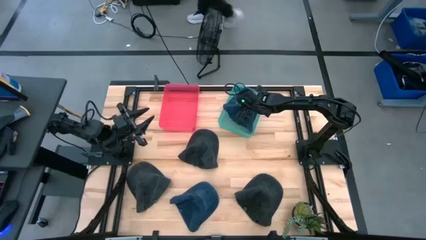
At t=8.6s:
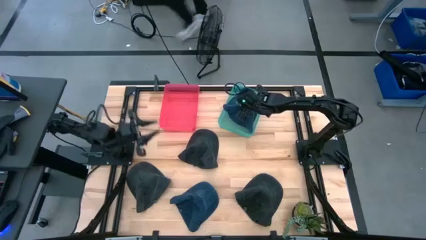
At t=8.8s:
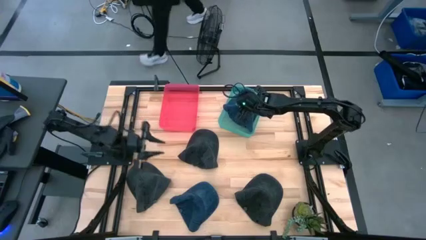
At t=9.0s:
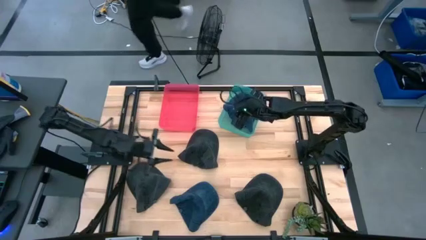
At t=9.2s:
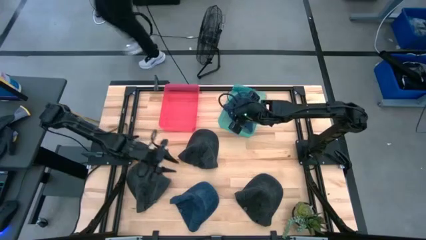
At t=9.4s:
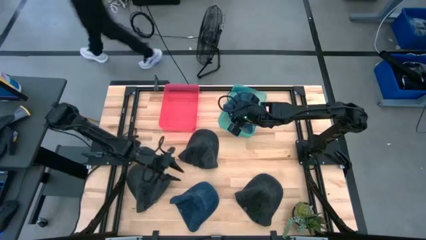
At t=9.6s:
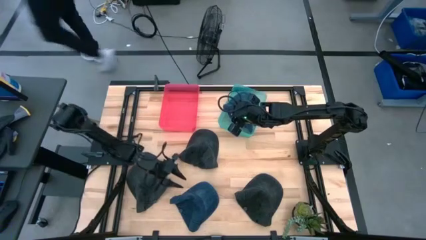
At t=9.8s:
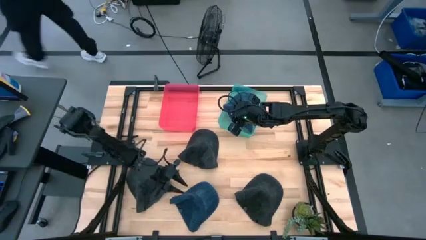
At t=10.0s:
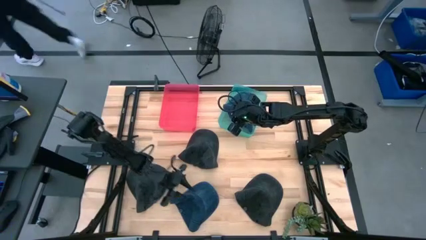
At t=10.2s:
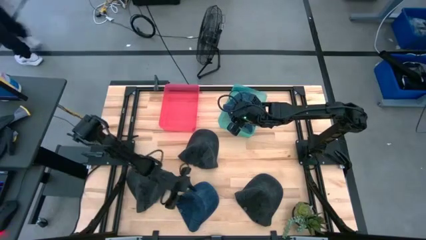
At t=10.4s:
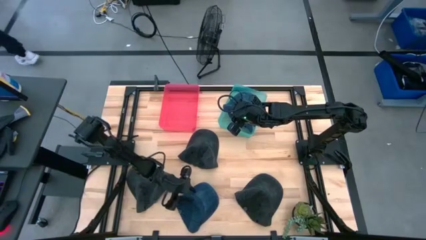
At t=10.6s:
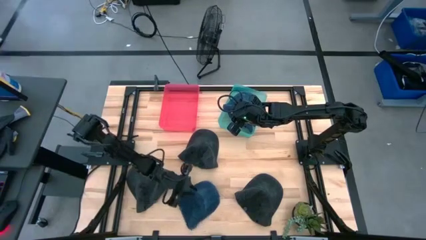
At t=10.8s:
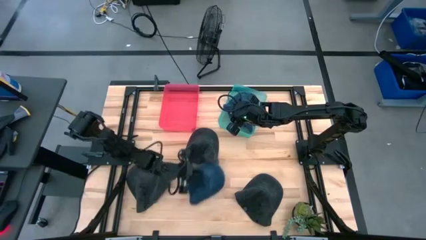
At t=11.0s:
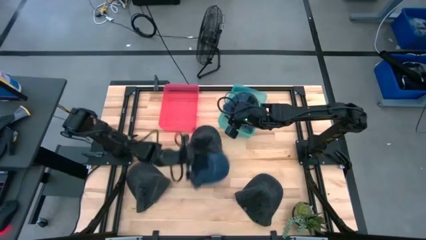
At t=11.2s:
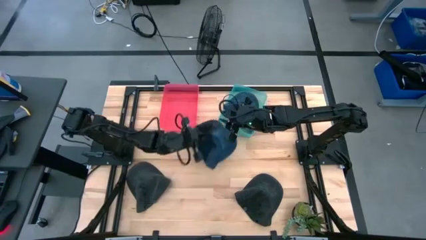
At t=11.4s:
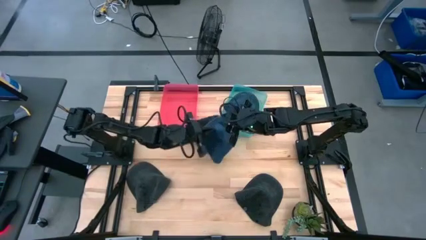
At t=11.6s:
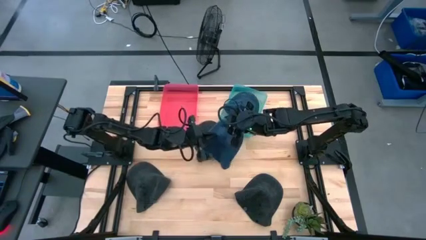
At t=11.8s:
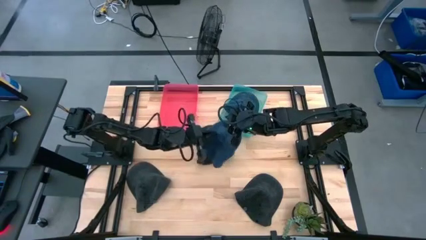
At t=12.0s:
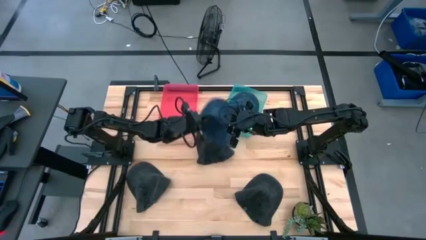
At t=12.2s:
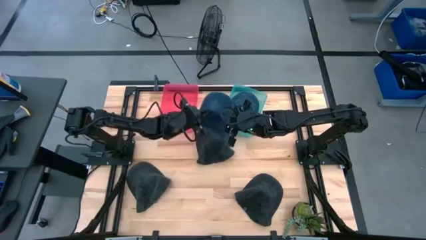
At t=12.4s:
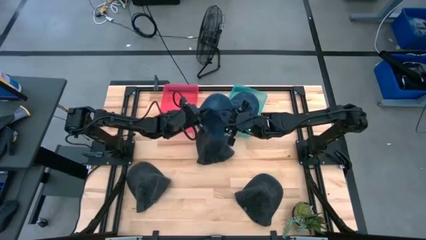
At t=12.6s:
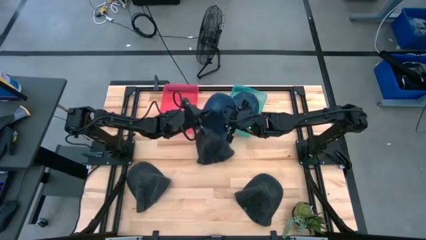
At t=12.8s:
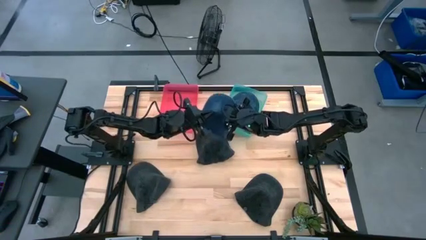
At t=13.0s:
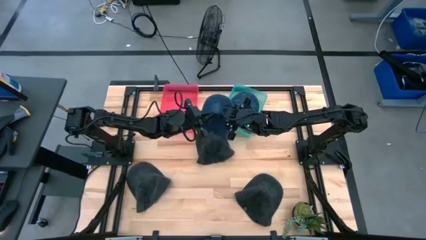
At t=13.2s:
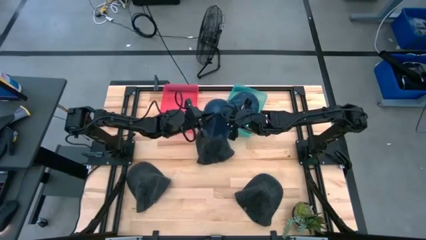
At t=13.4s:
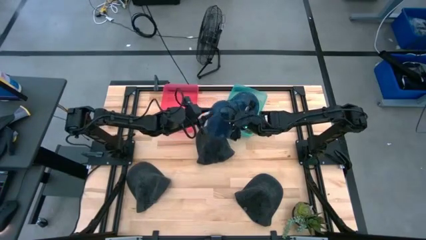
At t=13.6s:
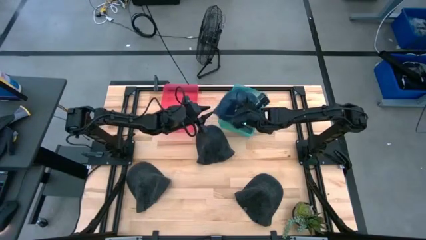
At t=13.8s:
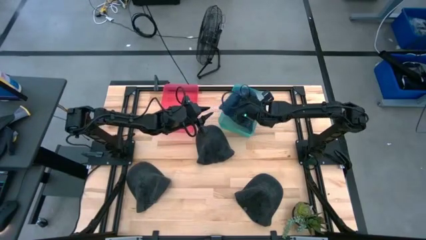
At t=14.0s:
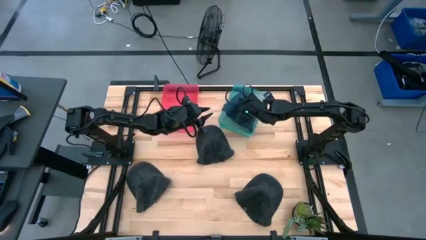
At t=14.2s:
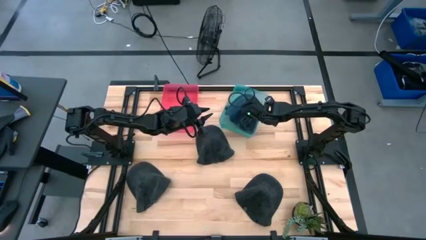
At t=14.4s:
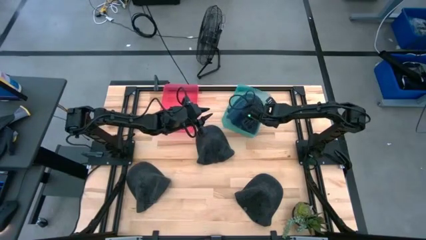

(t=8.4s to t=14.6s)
Task: Pick & Place hat
Put the blue cap into the blue bin

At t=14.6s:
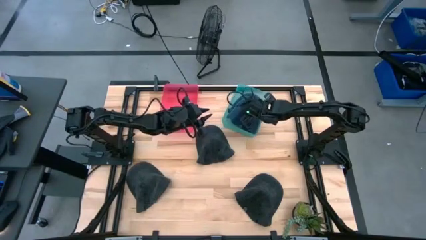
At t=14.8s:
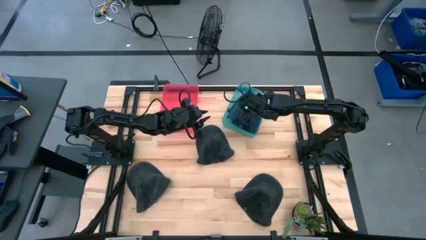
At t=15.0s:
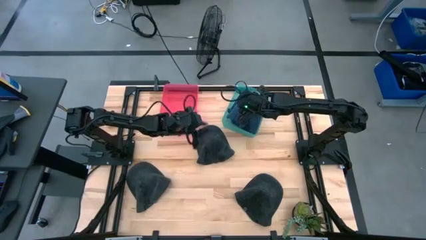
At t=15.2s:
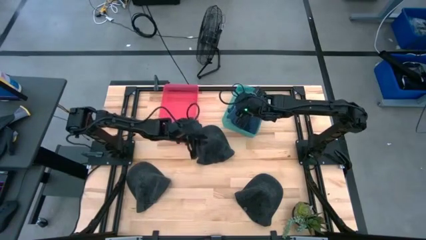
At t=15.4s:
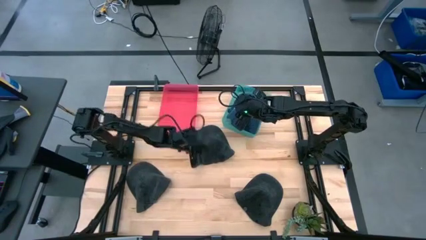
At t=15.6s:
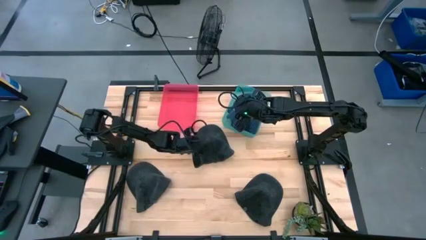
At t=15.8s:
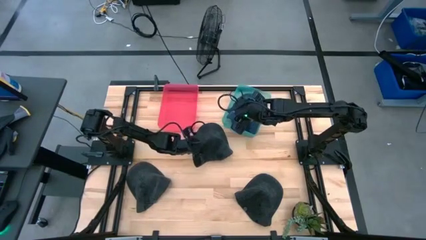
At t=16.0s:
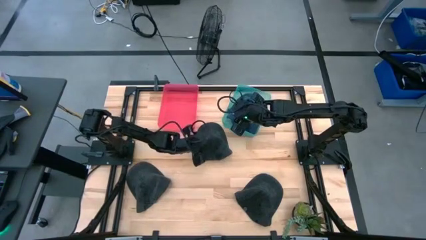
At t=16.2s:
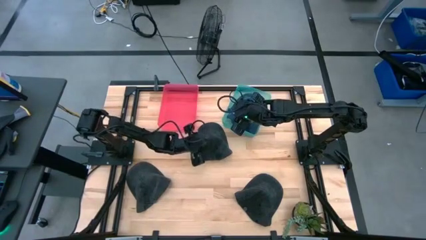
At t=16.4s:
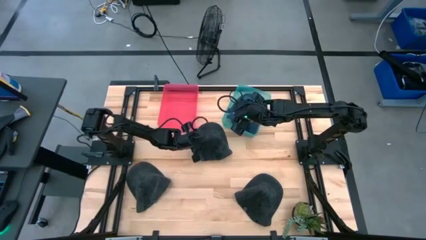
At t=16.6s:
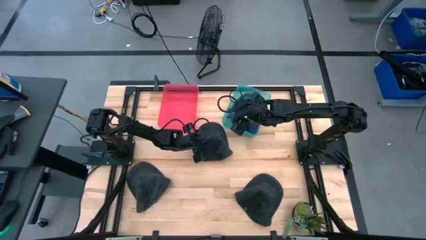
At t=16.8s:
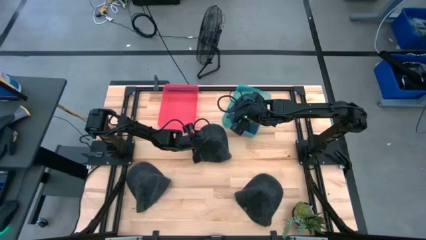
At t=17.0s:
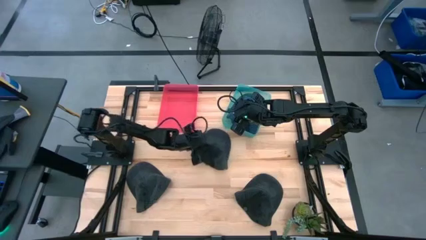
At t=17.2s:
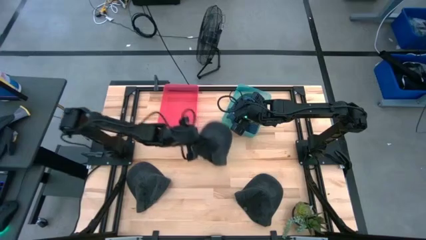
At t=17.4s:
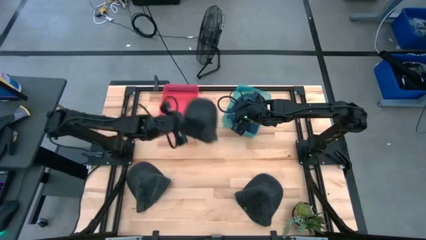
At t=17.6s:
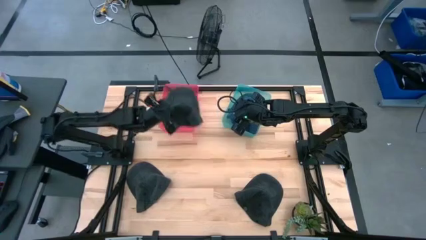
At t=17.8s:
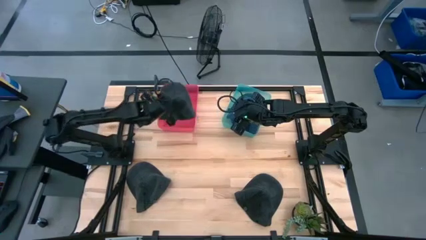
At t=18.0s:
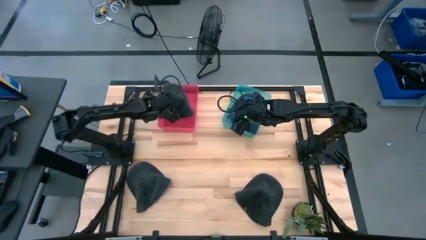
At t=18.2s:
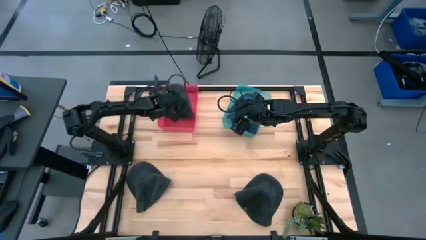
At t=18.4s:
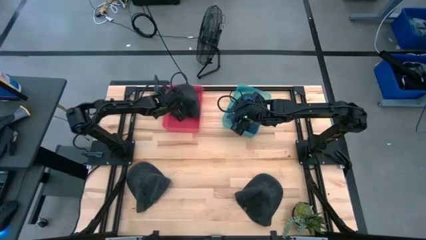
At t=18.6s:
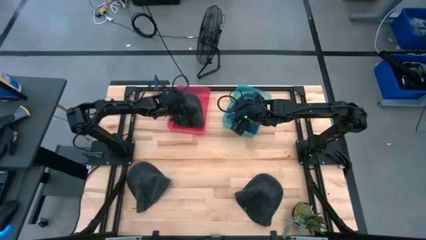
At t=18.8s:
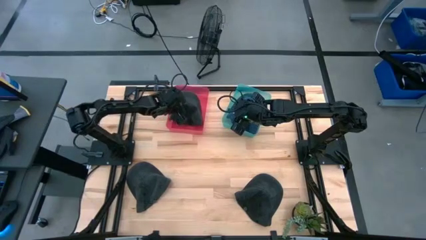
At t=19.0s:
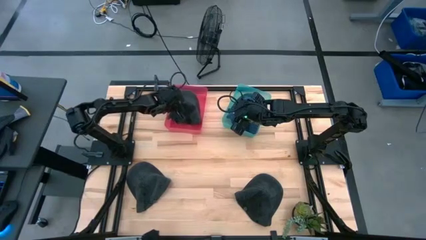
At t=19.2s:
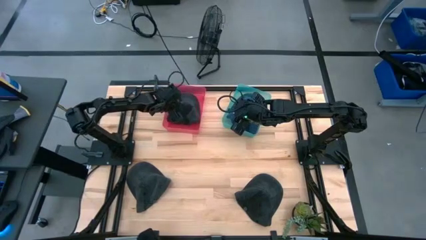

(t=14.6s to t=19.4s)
Put the top black cap into the red bin

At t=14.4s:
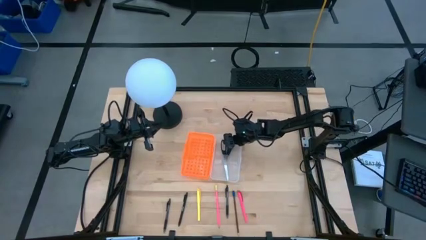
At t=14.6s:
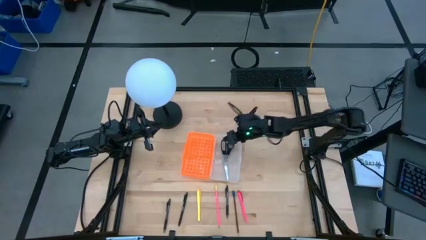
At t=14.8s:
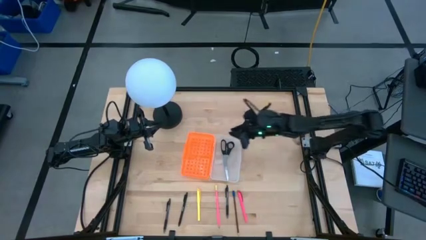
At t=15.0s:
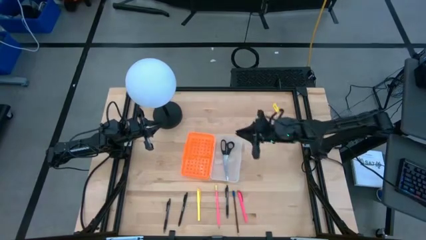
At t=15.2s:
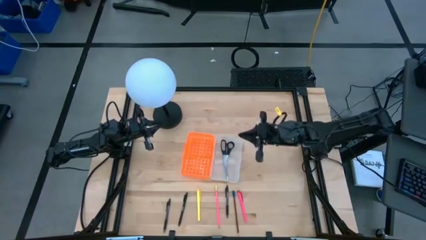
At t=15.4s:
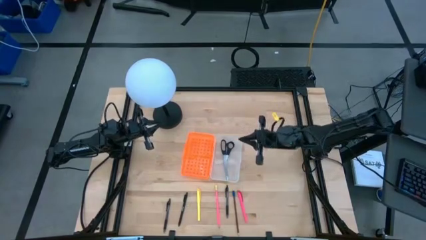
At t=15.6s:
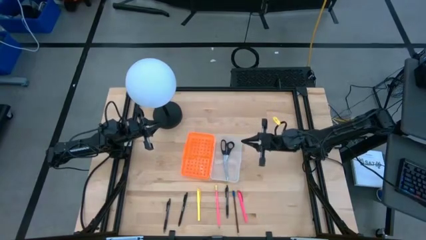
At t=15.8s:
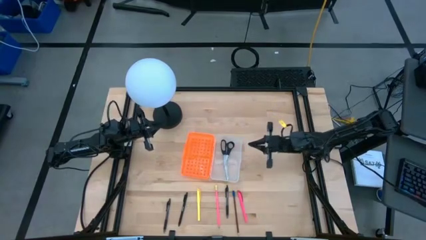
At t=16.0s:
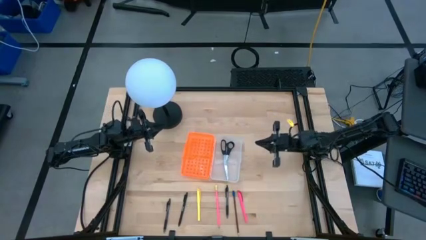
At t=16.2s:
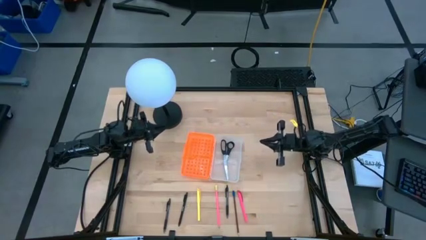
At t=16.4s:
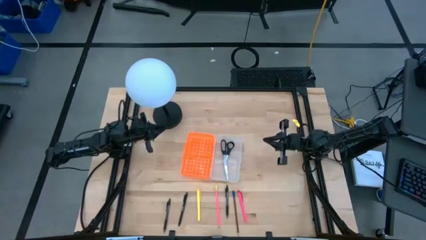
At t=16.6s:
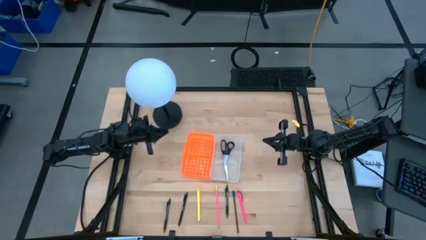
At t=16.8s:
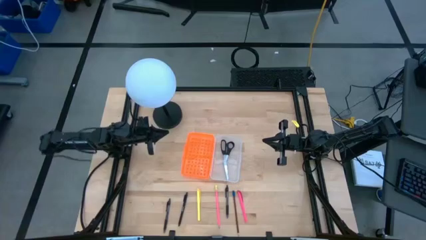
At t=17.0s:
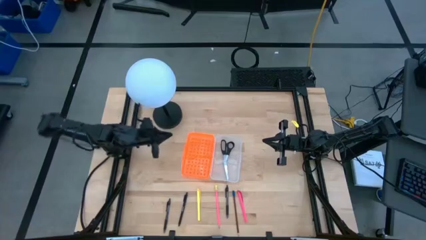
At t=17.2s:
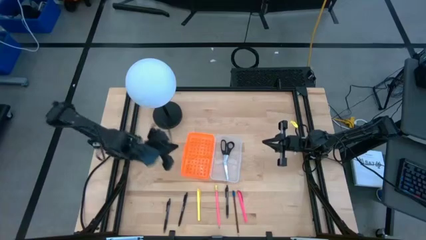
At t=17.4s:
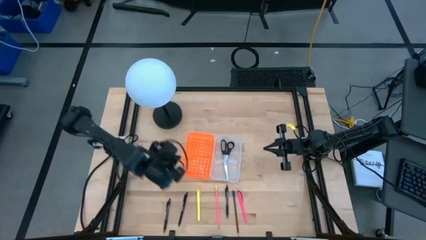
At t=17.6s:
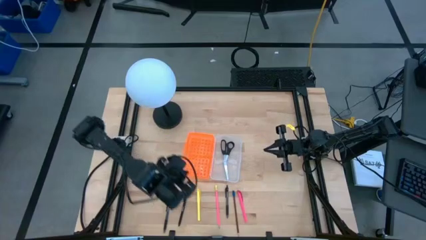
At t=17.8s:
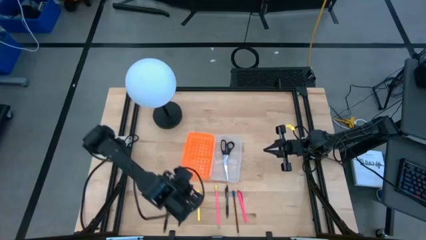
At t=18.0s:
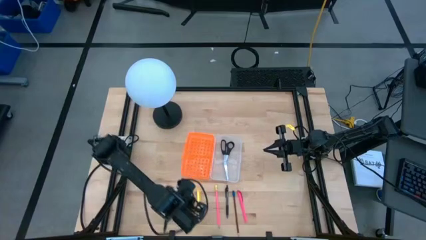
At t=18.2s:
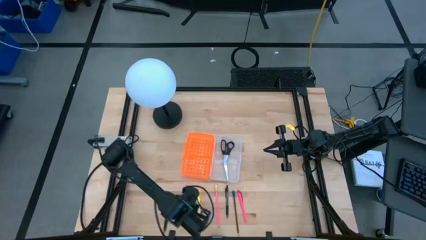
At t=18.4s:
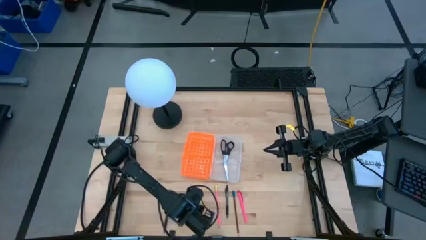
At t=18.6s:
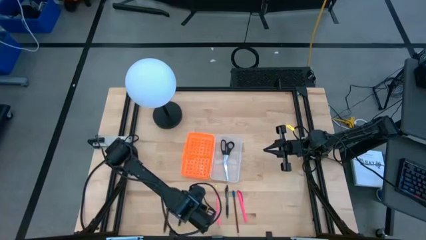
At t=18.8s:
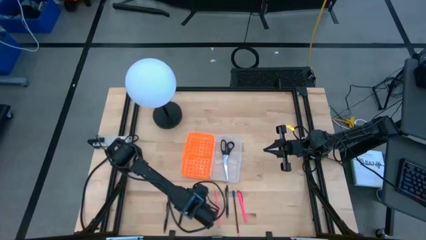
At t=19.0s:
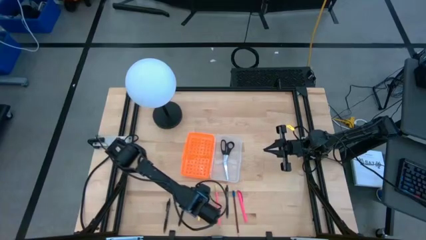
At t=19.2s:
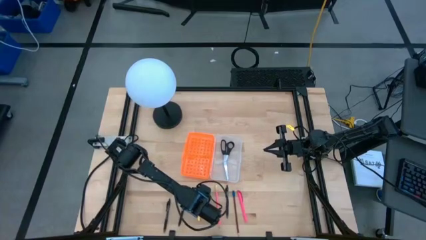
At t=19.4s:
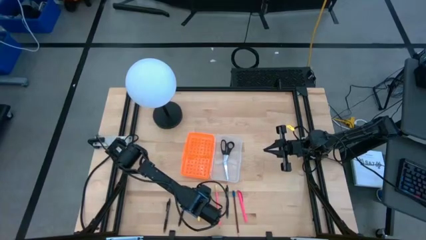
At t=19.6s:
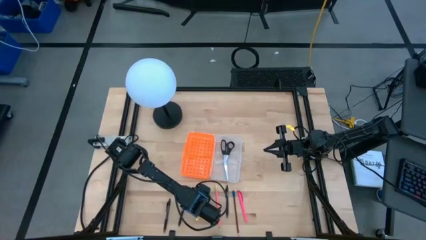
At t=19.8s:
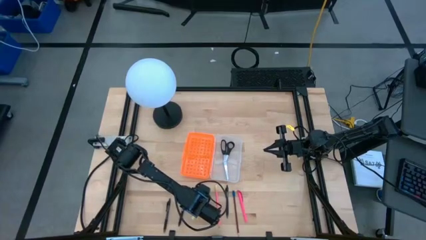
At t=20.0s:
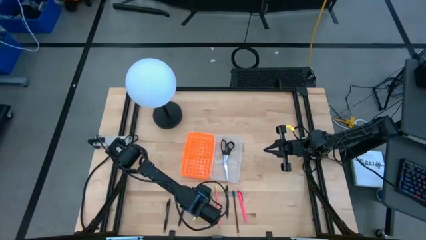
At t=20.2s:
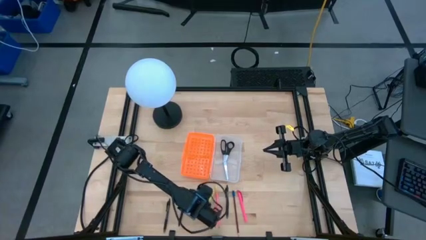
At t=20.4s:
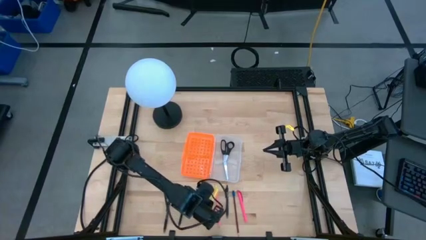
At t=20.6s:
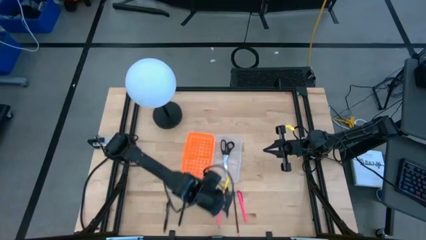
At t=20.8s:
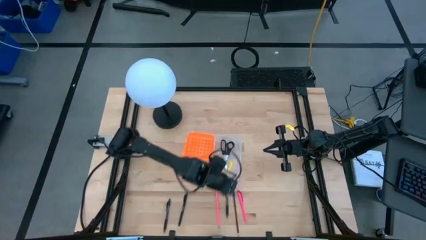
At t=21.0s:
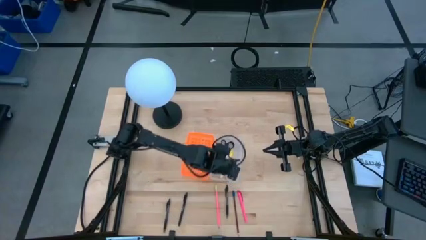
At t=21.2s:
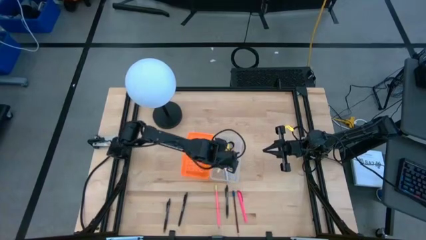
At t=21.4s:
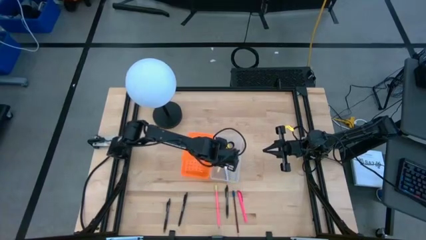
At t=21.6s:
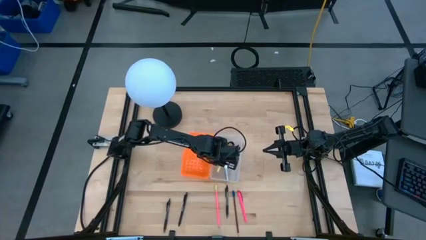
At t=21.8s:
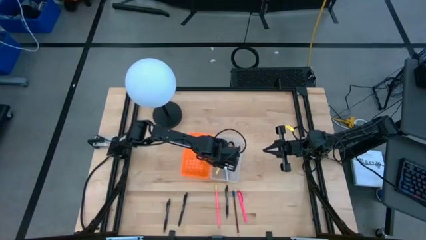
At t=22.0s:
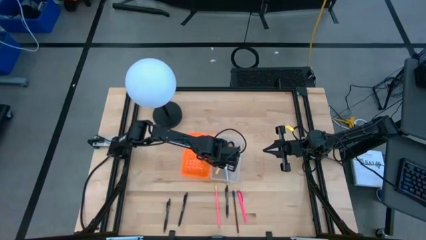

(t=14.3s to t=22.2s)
Task: Pick & place school supplies into a supply box
Put the yellow pen into the orange supply box
